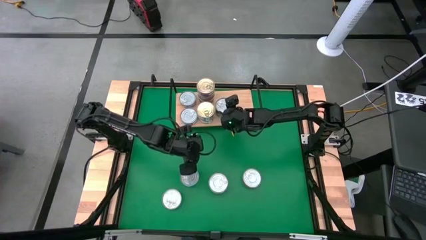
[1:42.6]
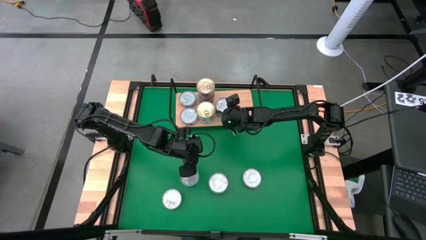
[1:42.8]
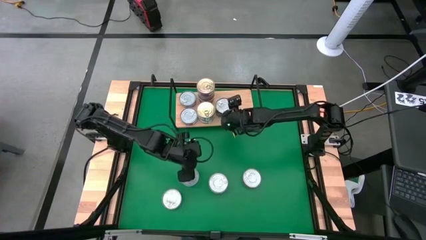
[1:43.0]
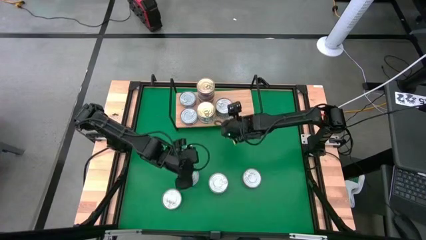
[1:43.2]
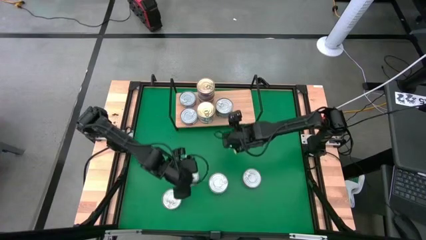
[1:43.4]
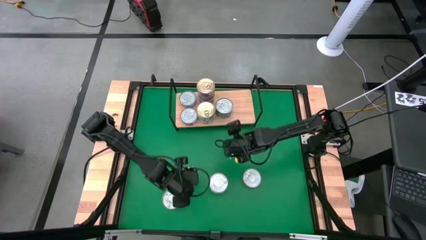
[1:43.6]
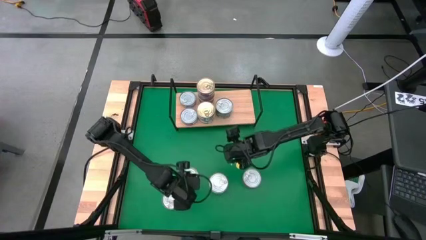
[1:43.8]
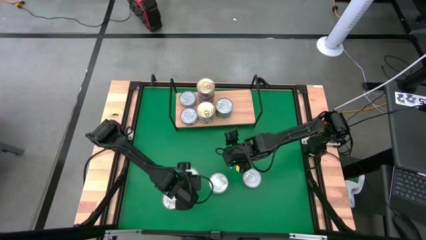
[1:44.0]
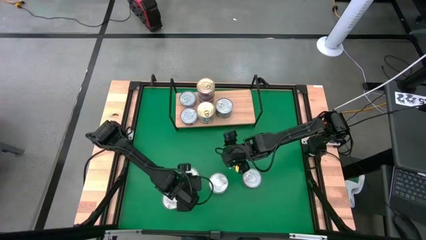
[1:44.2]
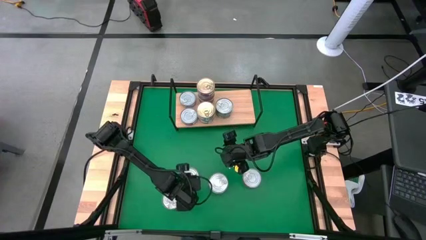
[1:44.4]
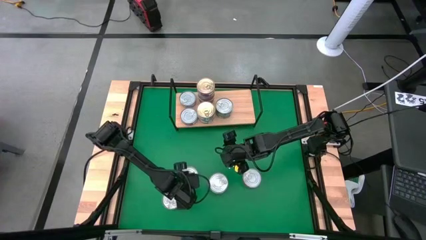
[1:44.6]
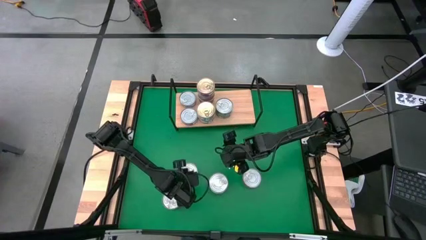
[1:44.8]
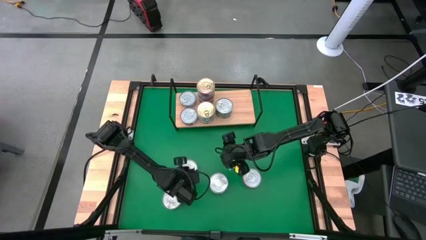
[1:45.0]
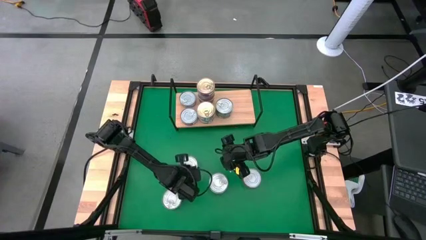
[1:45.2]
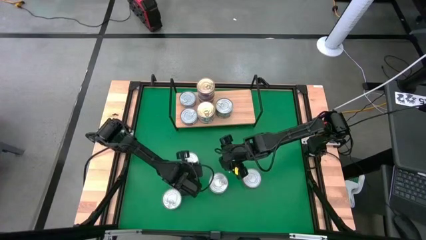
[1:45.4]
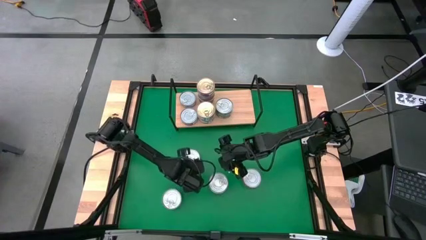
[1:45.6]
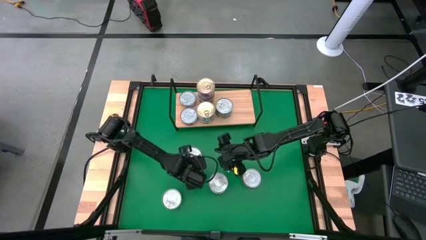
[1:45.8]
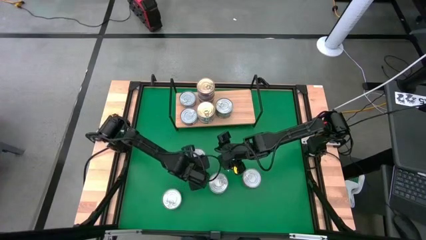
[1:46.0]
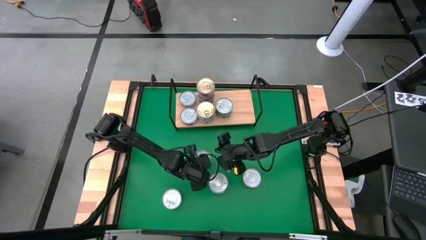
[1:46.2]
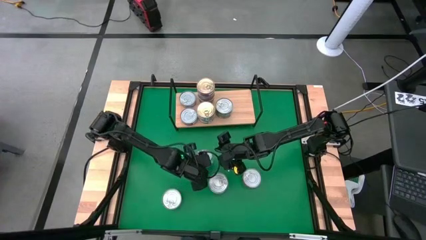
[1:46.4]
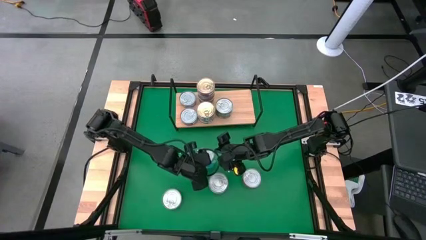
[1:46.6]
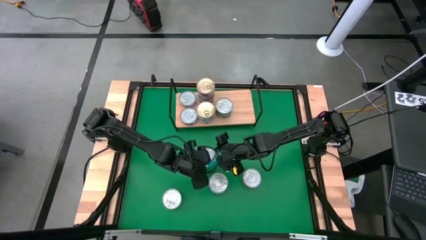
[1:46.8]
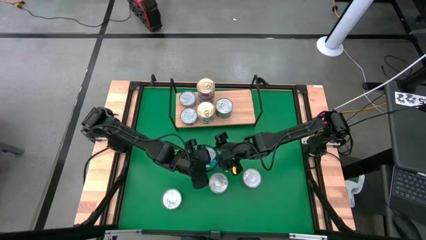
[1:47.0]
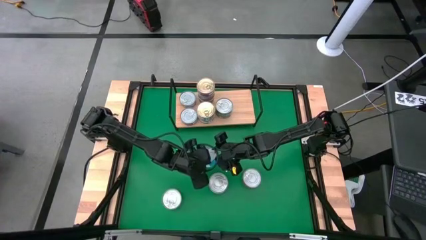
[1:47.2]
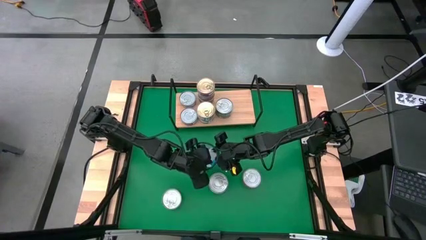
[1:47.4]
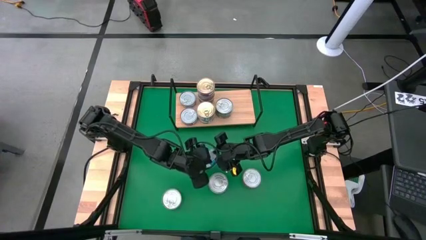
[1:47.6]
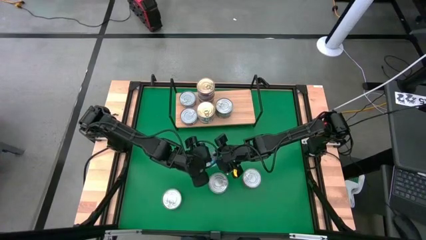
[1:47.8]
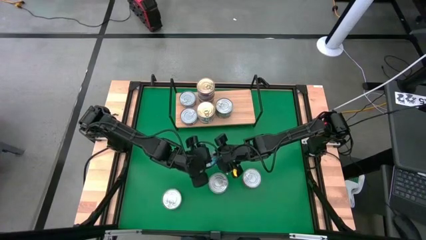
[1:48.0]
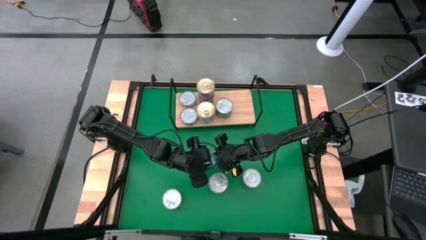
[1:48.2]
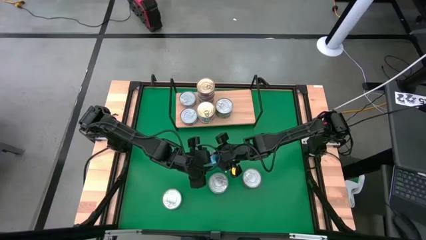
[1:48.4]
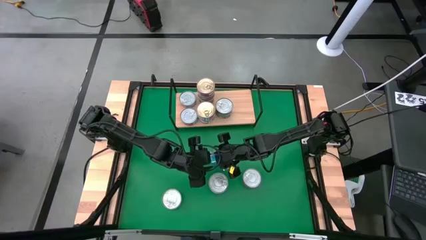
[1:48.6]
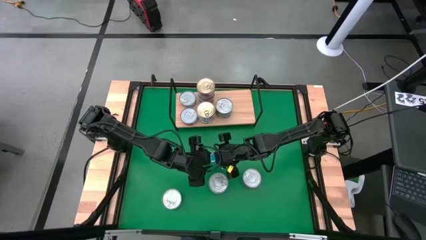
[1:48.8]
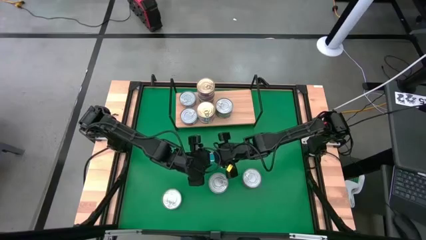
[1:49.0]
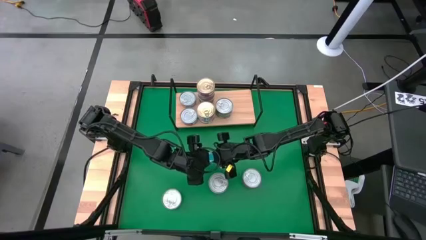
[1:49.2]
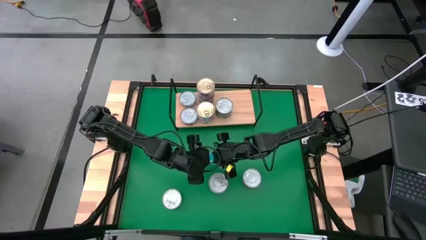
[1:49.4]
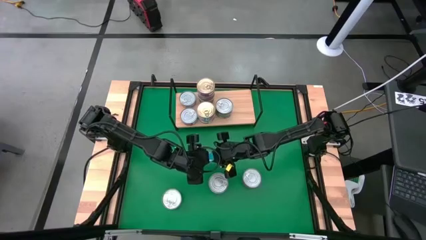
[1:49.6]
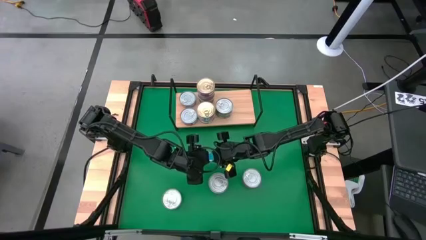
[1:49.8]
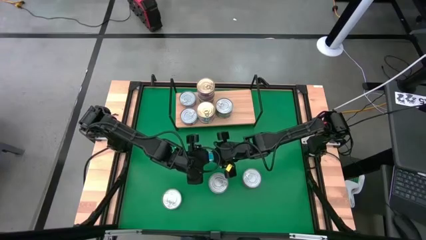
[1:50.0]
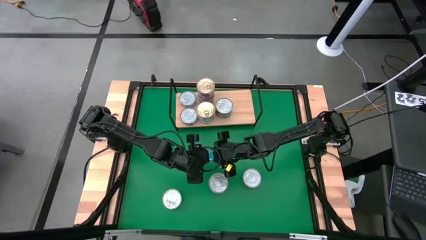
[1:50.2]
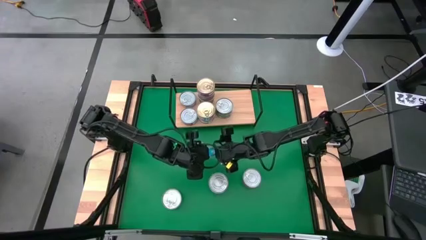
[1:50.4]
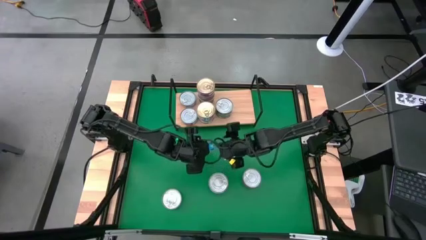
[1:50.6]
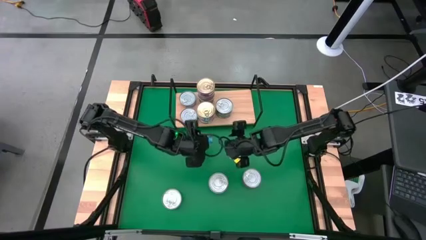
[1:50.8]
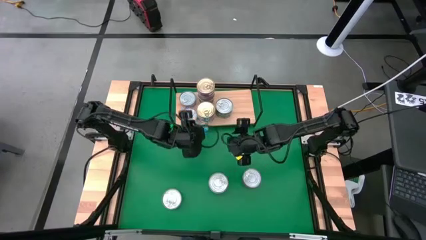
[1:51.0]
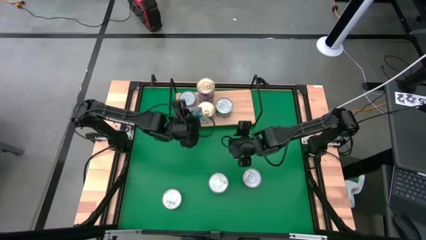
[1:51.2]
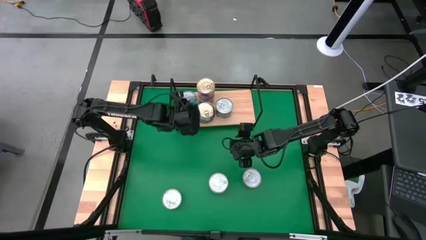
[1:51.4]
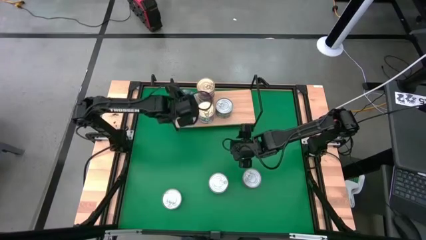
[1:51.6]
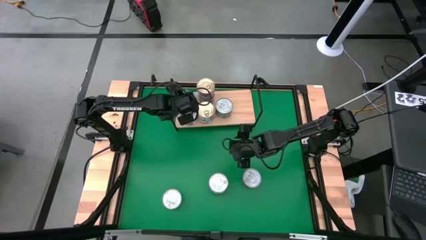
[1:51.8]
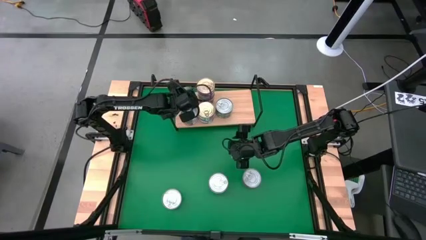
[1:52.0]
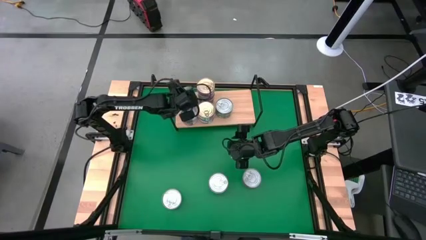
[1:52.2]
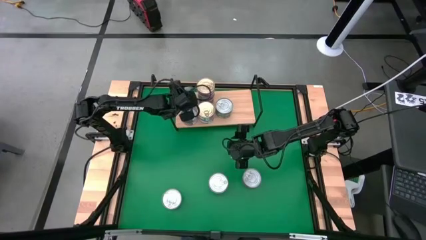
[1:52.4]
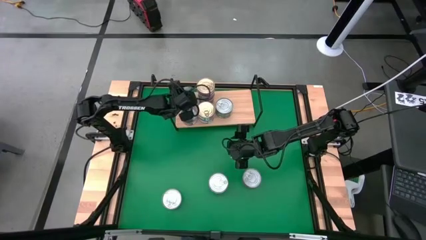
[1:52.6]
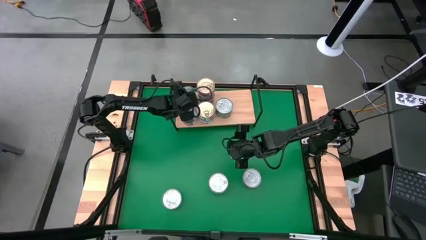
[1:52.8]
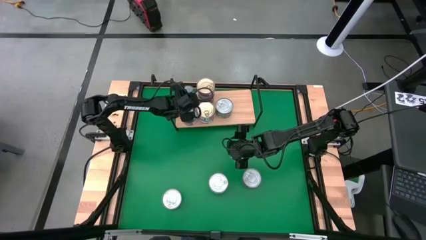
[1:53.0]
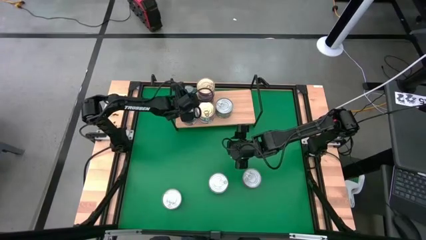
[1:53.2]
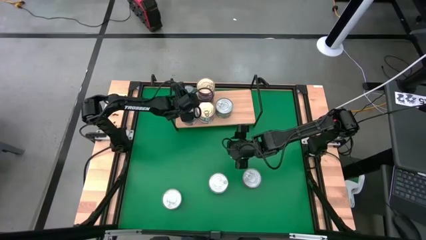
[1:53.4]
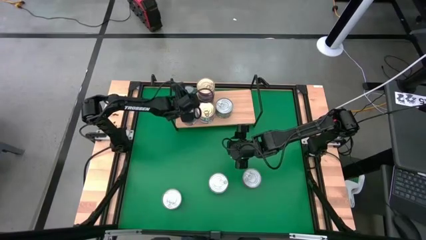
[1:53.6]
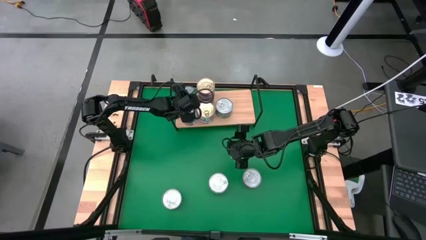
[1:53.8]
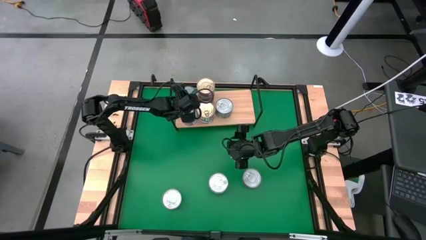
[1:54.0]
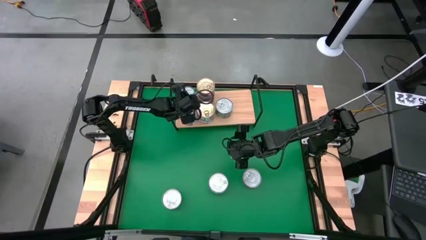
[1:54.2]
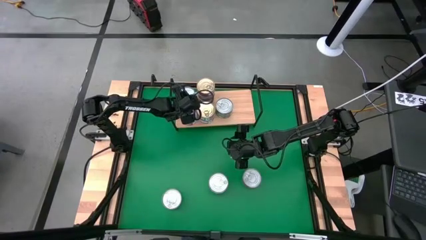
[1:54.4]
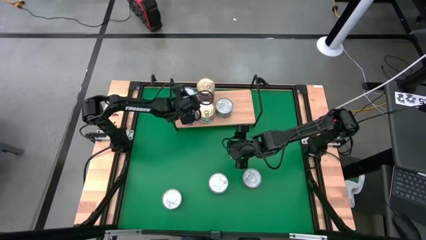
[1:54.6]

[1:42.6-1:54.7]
Task: Stack canned seafood by type on shelf
Stack the yellow-blue tuna can on top of the yellow-blue tuna can on the shelf

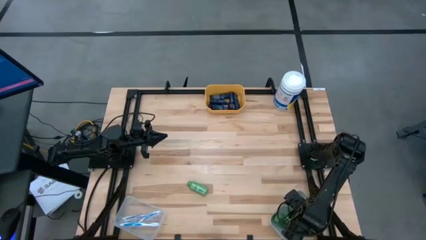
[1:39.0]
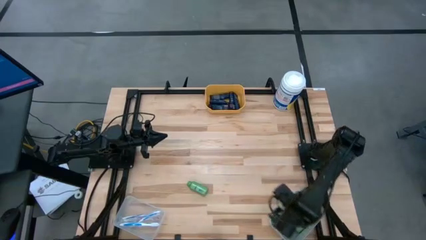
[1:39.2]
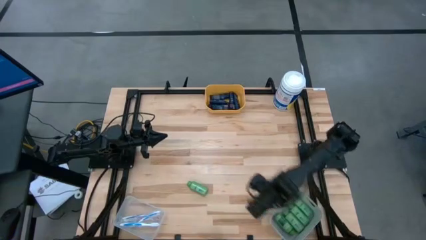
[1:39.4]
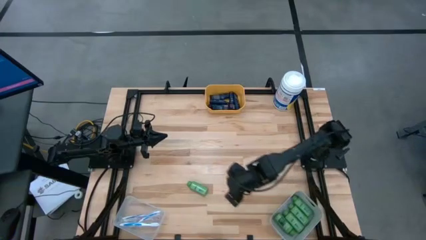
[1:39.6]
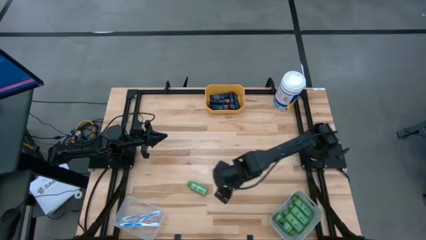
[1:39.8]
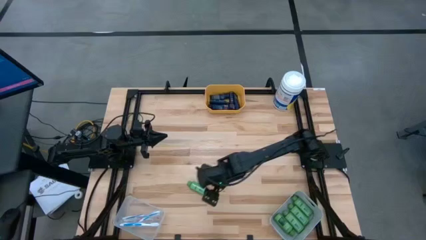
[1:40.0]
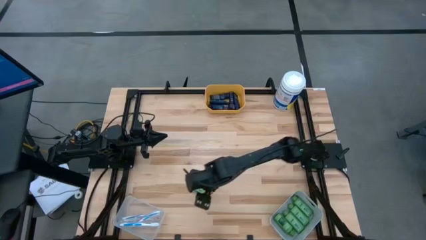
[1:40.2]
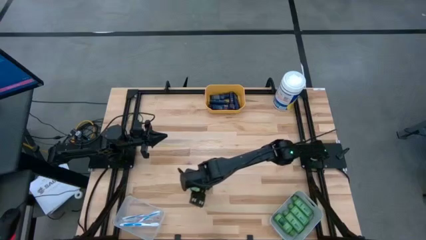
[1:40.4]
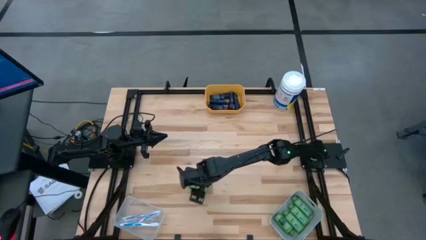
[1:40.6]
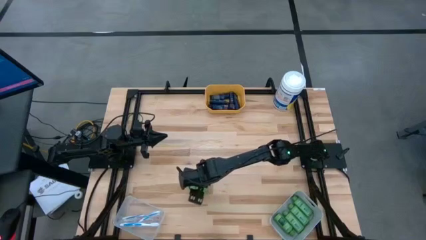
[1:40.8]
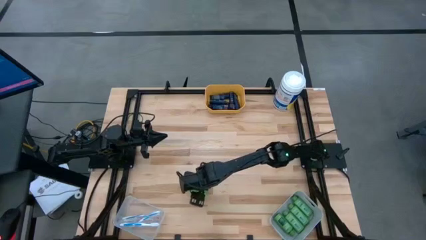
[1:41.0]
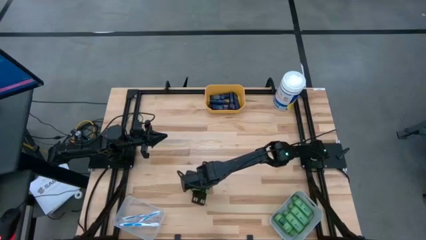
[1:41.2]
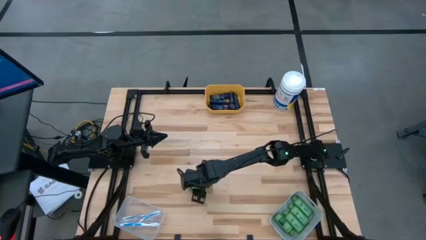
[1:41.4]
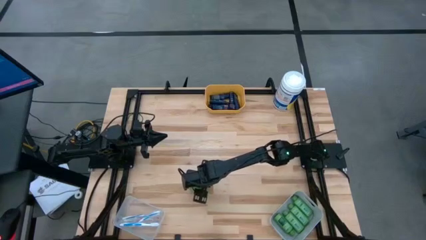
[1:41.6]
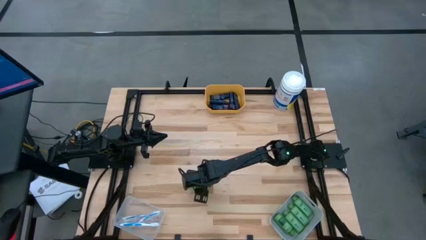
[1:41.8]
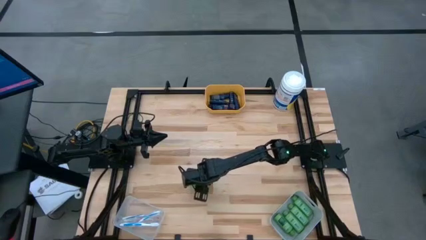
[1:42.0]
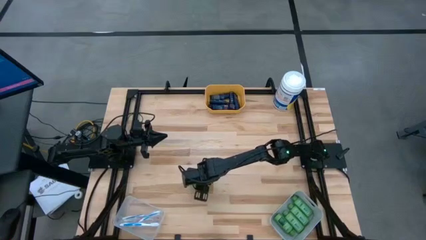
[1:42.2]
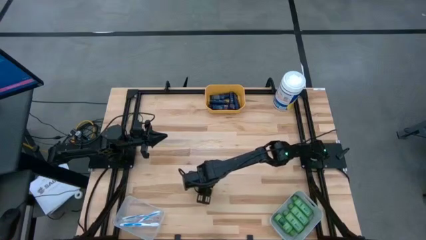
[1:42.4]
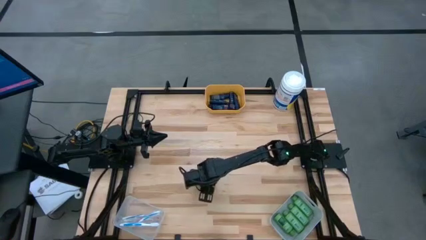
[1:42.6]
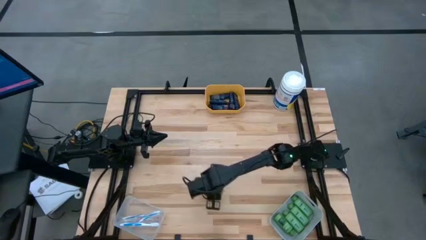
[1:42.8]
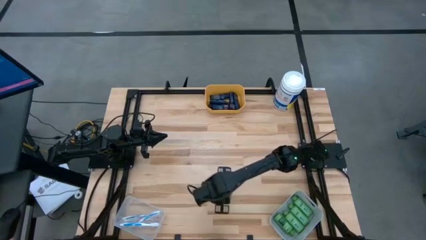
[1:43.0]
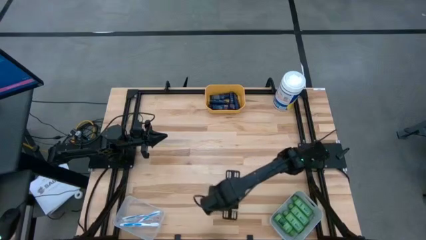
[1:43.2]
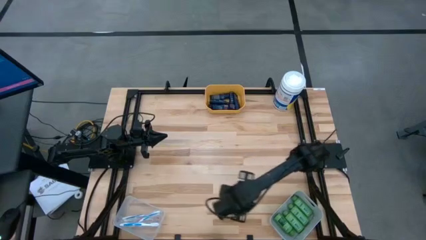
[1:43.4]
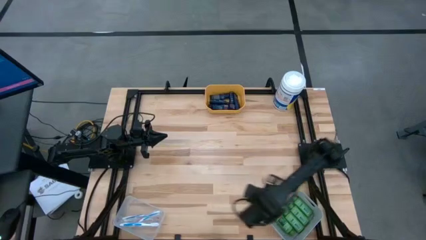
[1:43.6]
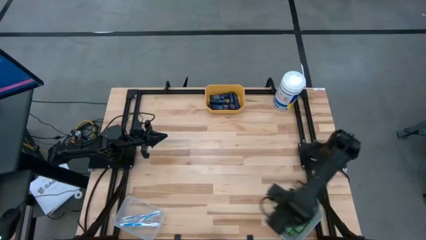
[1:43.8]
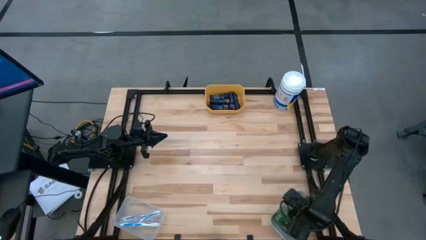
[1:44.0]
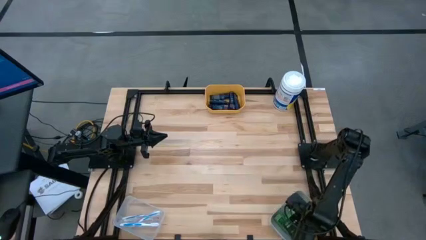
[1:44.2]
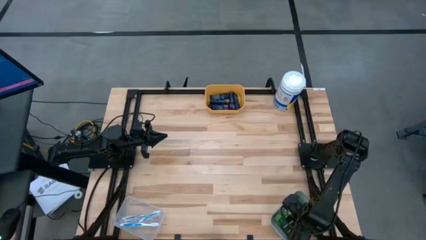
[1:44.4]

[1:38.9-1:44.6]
Task: Pick & Place Travel size toiletries
Put the shampoo into the white bin
